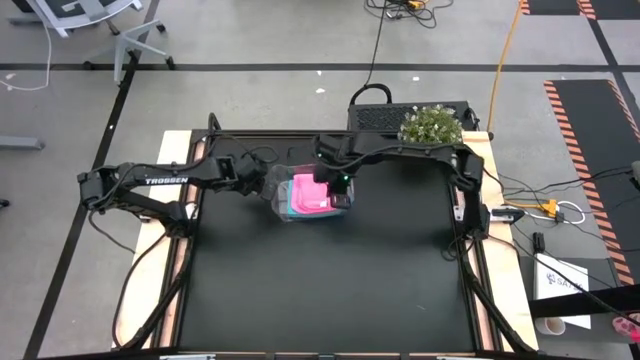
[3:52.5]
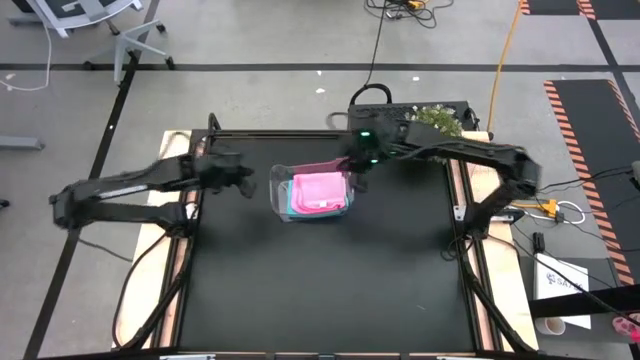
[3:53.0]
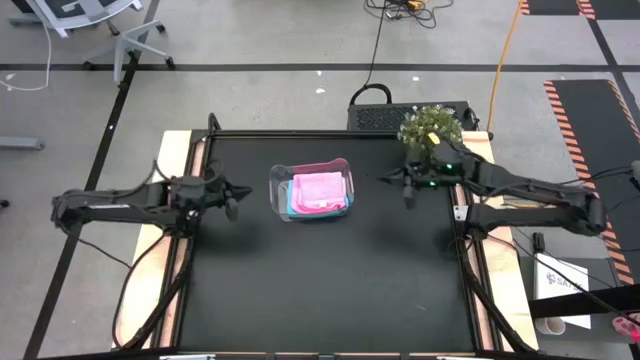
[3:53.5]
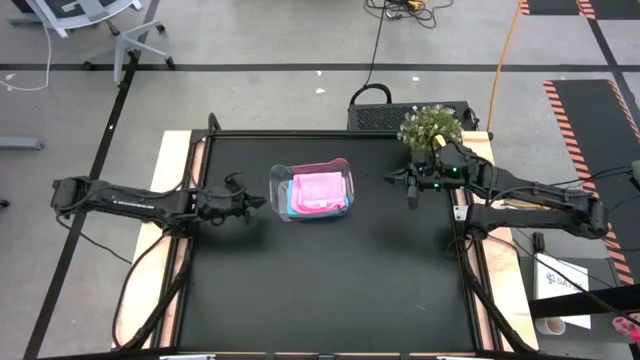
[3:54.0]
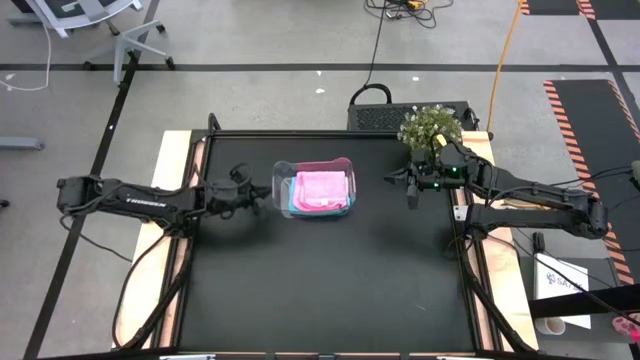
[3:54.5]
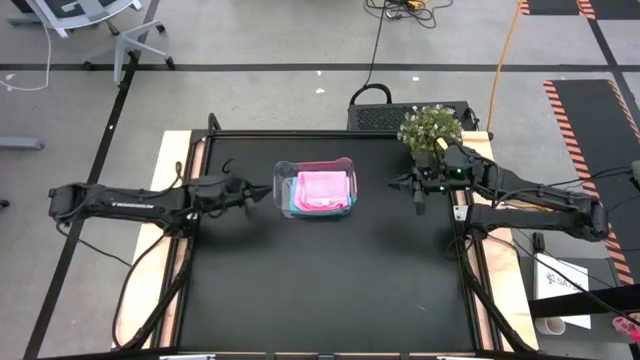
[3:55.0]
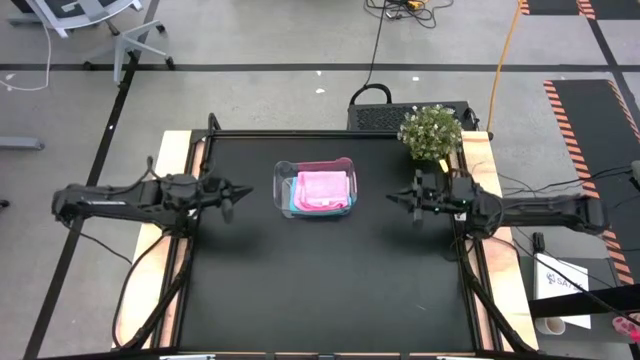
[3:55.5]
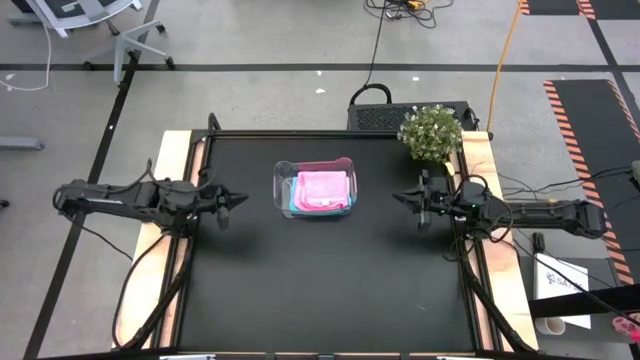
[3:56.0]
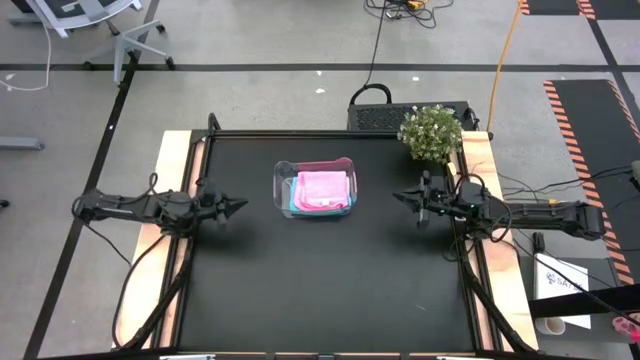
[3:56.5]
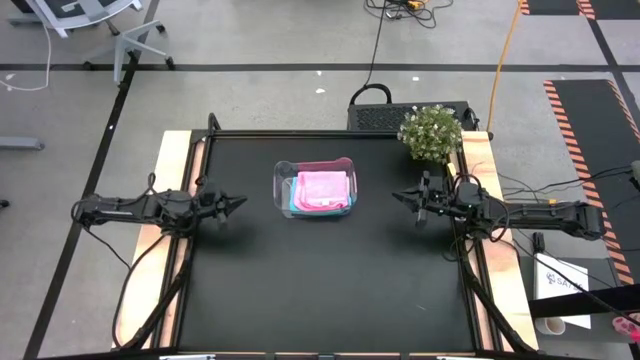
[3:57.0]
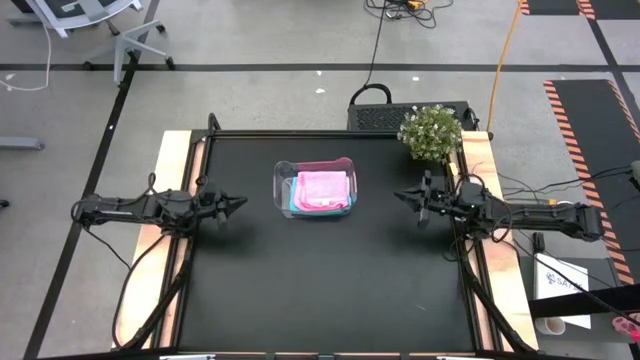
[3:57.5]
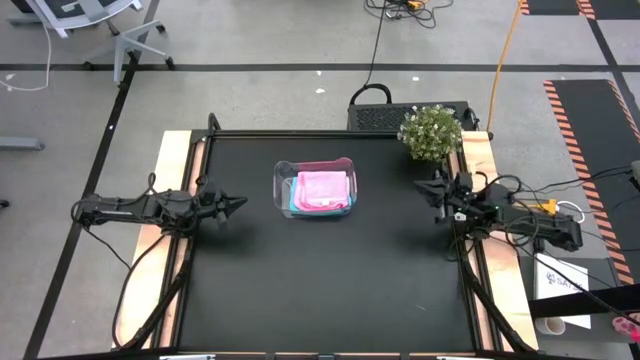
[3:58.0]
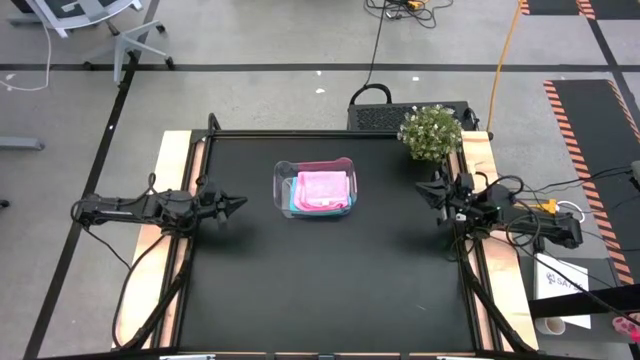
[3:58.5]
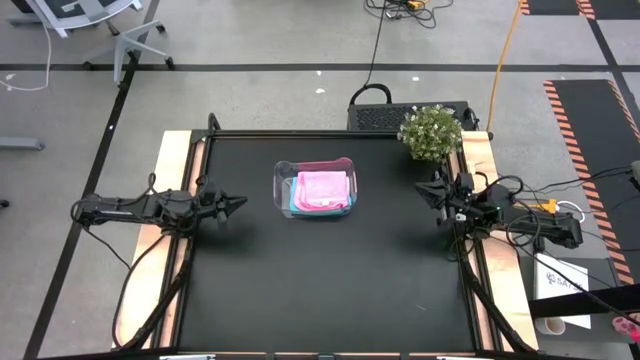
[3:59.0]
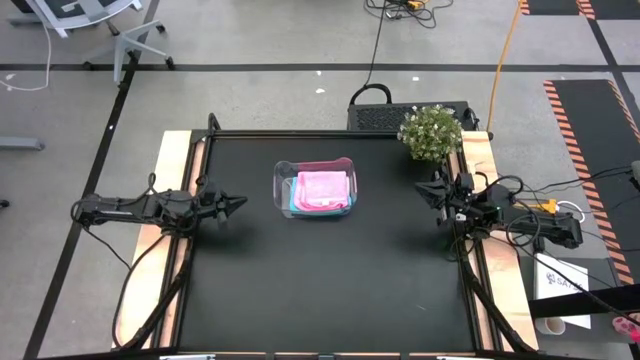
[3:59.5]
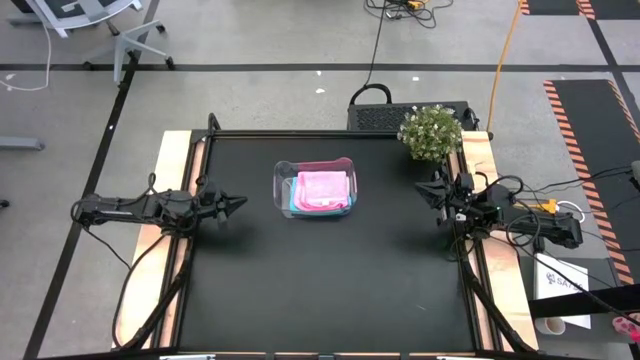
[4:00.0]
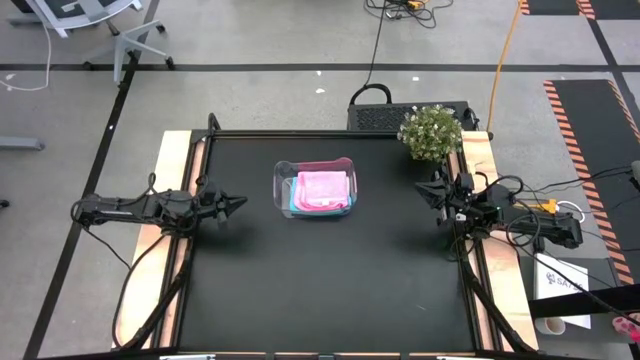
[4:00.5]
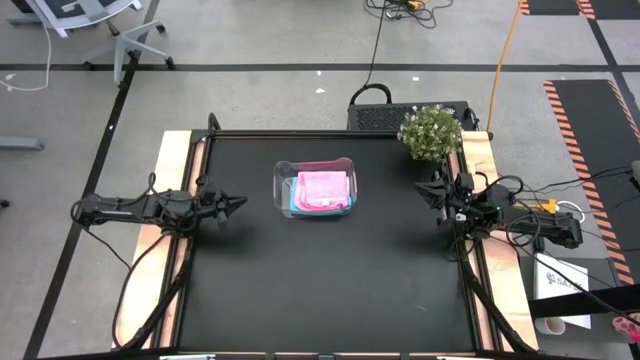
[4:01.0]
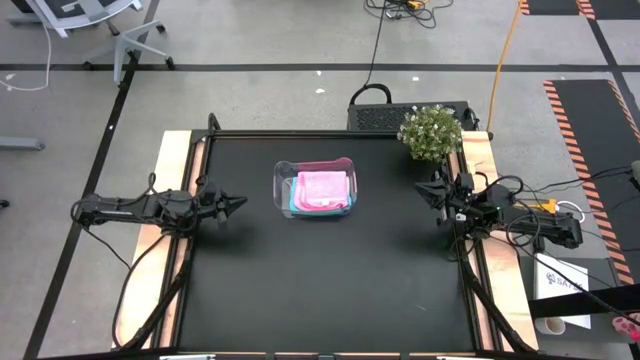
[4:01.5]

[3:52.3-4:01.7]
Task: Fold microfiber towels
Return to Home Position

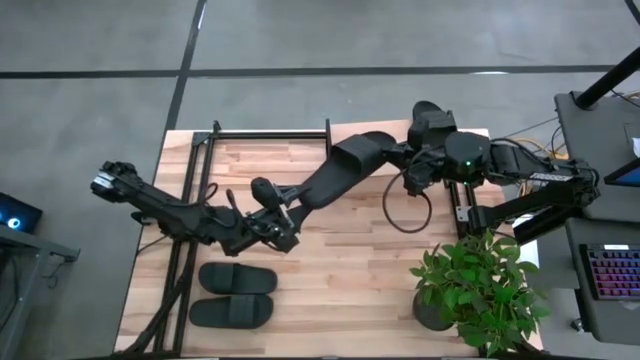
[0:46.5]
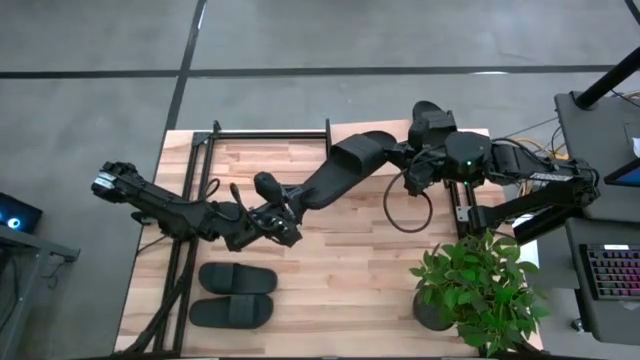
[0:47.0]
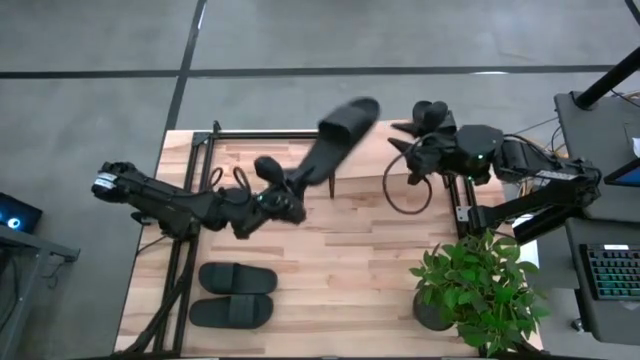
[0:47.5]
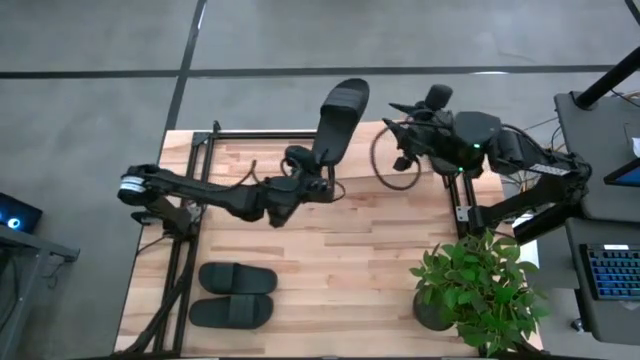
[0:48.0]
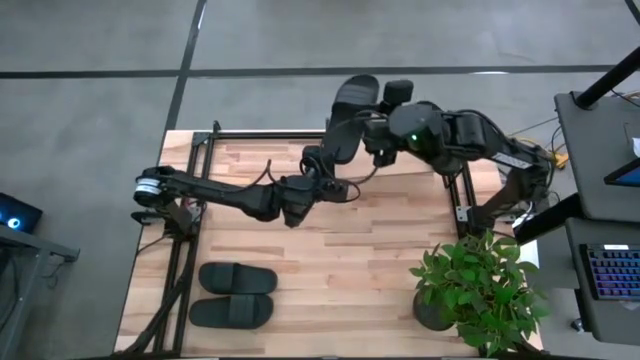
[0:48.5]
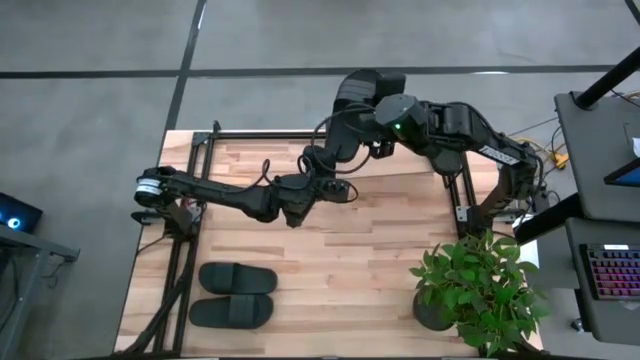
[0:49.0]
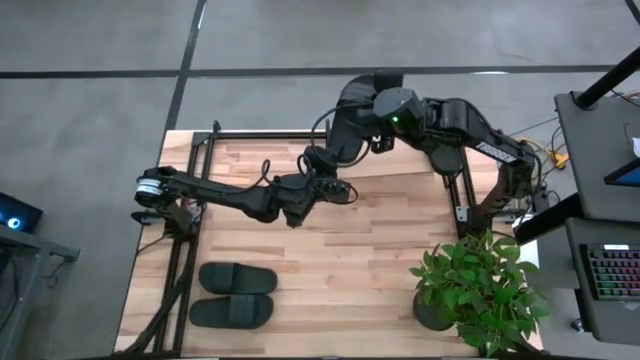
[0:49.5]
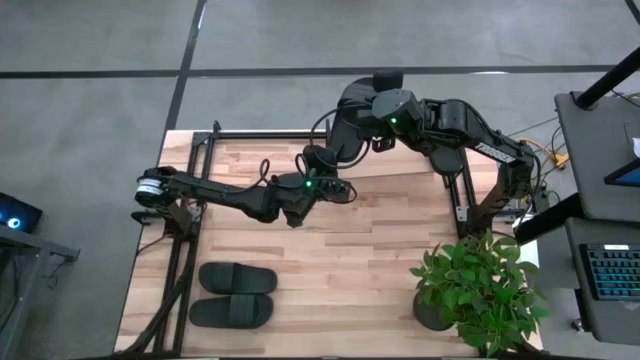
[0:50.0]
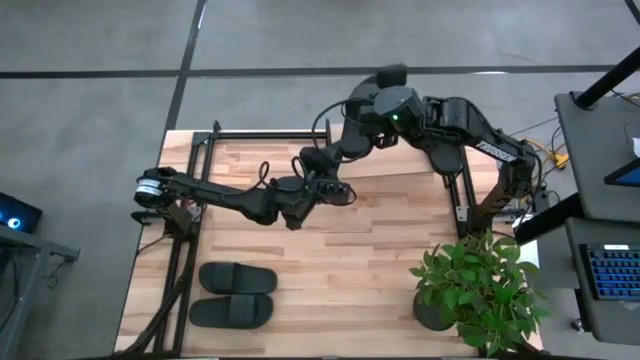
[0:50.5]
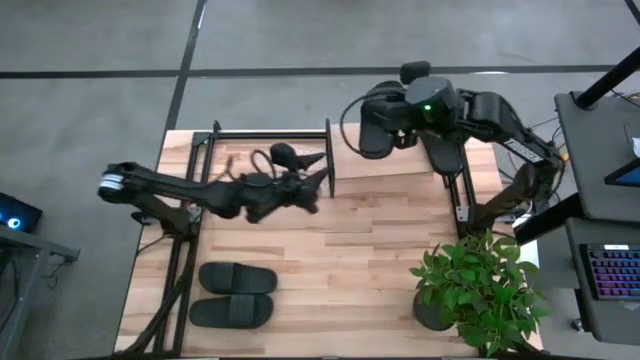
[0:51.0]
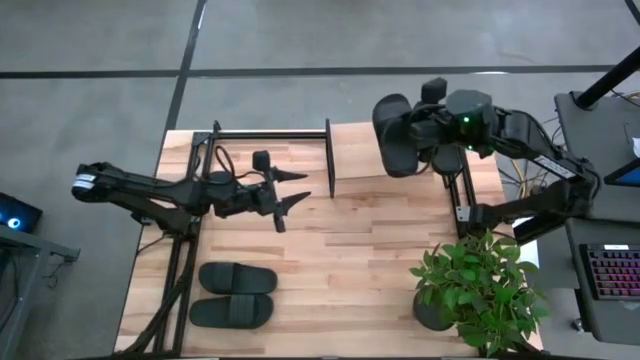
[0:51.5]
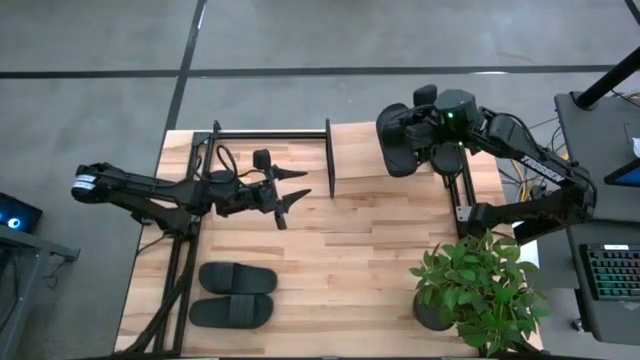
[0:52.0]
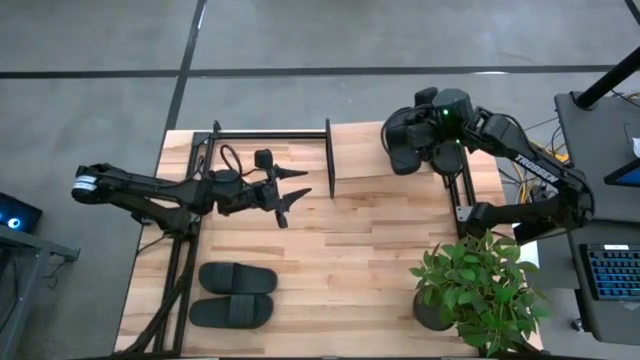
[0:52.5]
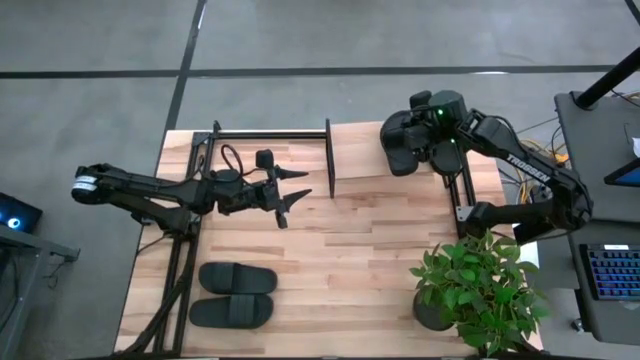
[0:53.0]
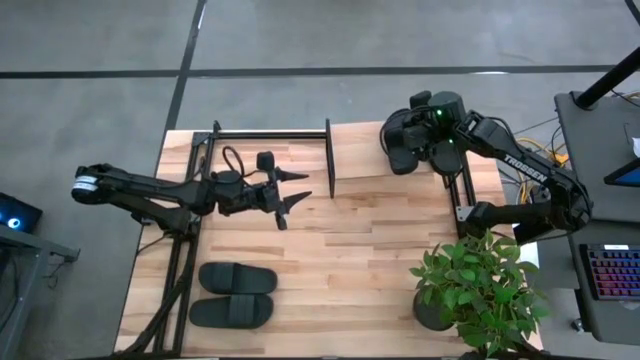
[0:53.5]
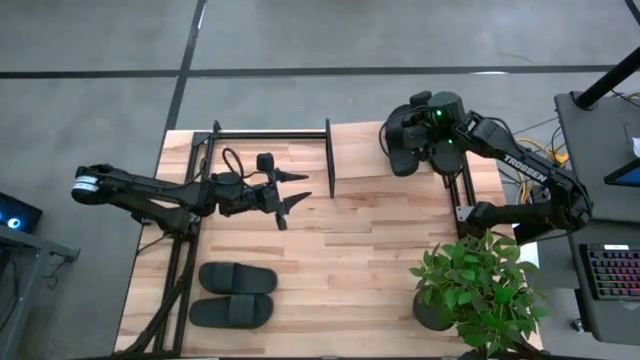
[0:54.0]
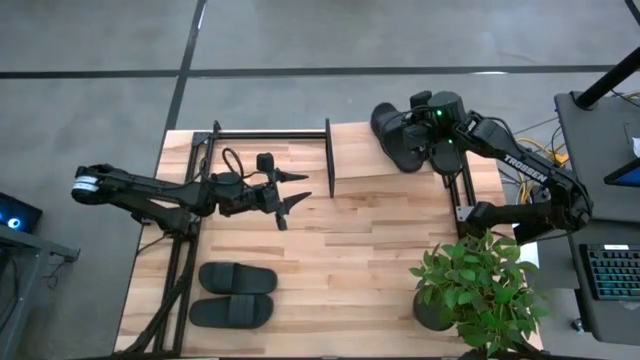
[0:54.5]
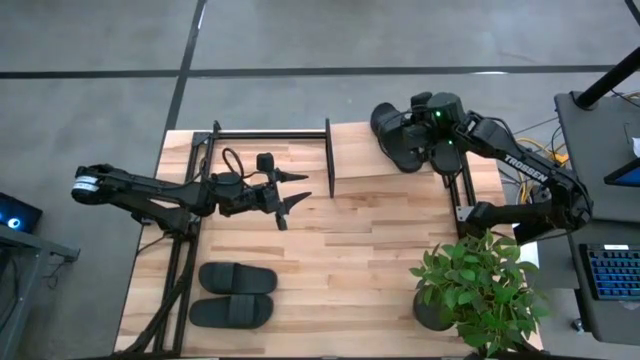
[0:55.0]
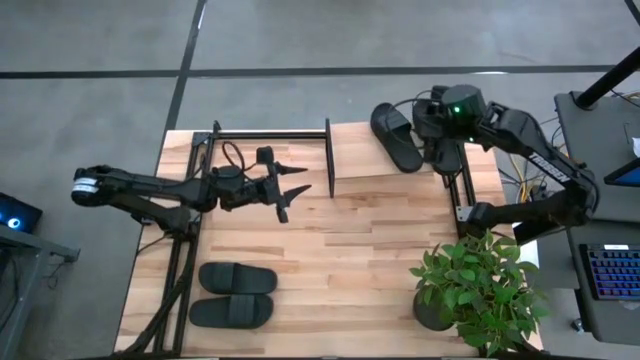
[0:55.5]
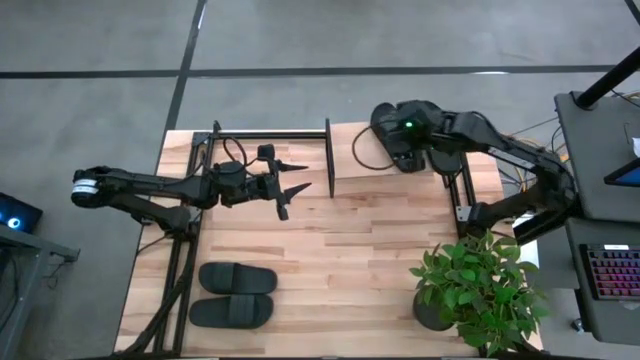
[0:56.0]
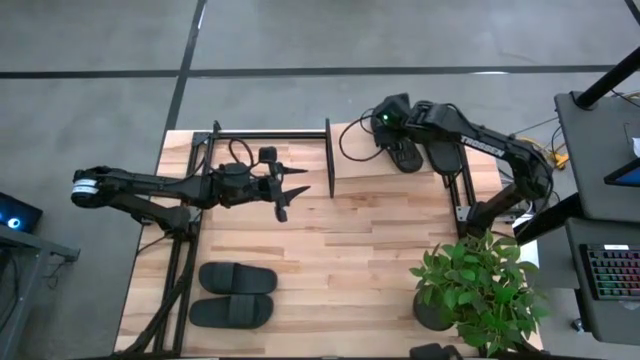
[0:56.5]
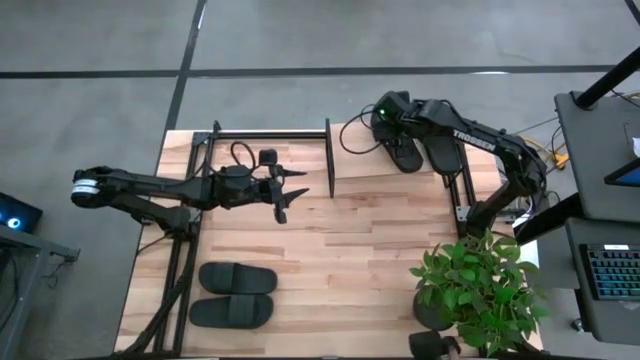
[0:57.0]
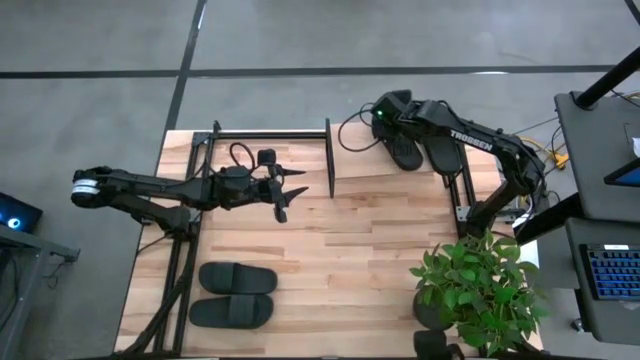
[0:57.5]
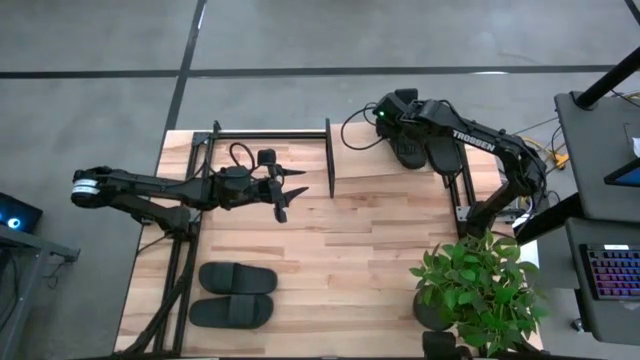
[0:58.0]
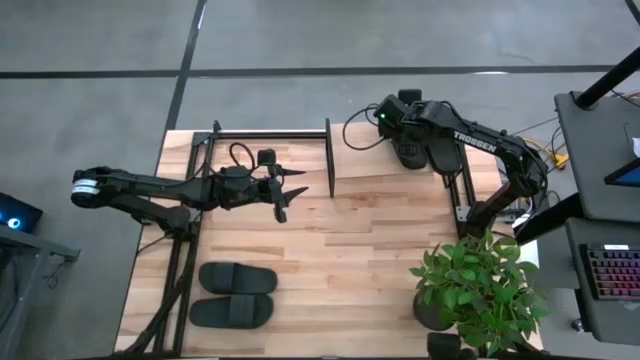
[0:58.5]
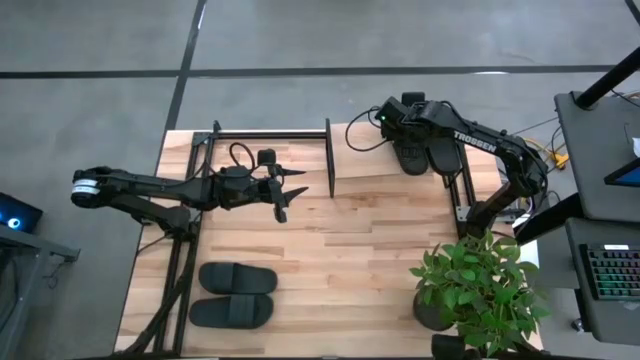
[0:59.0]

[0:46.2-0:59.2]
Task: Pick and place slides into the shelf
Put the black slipper on the shelf
